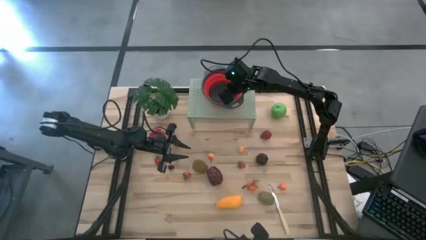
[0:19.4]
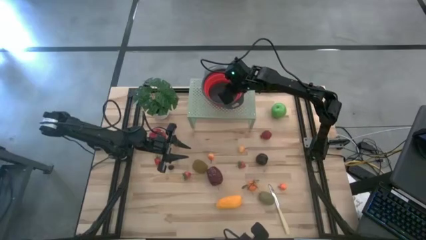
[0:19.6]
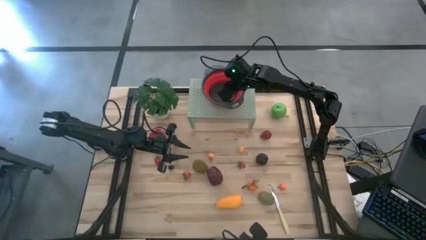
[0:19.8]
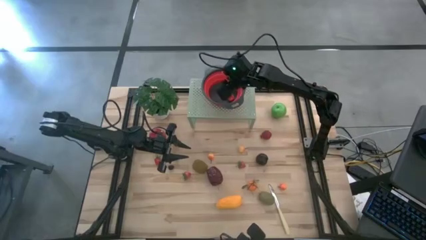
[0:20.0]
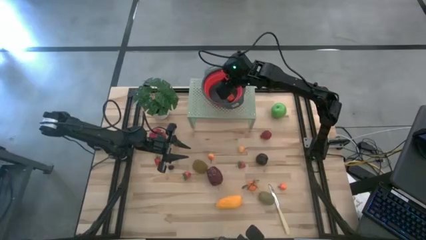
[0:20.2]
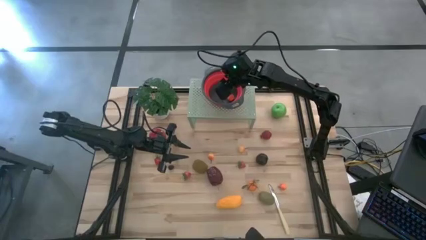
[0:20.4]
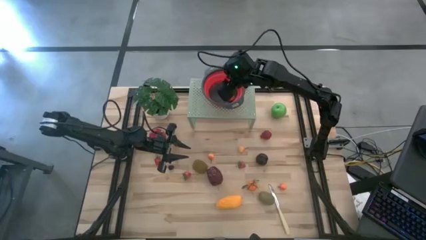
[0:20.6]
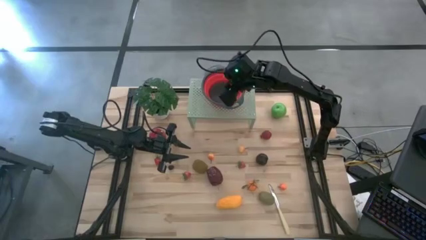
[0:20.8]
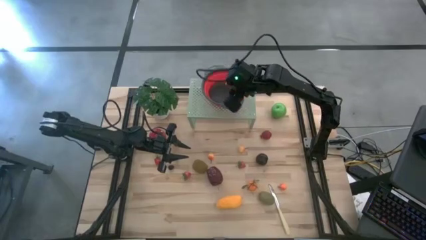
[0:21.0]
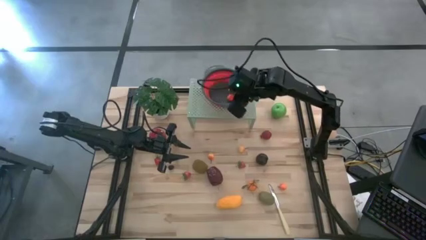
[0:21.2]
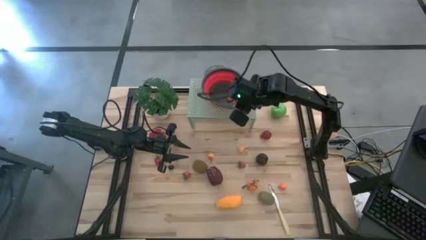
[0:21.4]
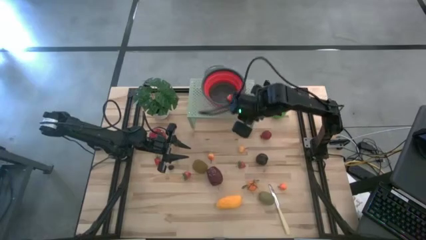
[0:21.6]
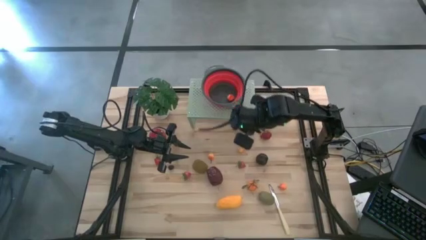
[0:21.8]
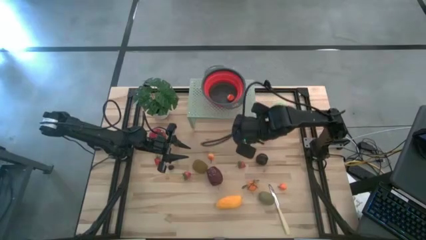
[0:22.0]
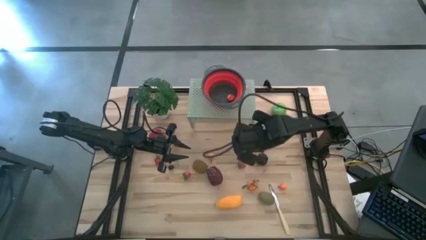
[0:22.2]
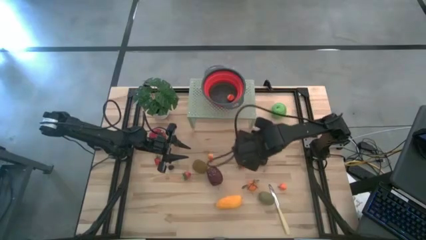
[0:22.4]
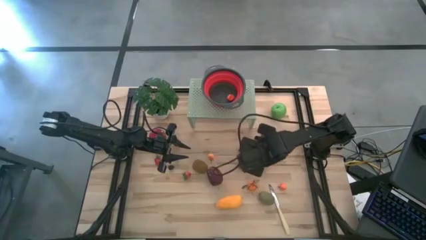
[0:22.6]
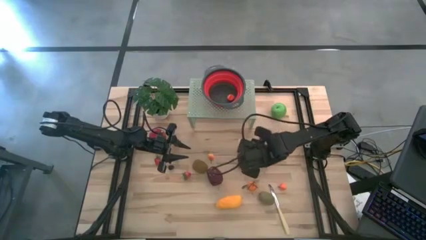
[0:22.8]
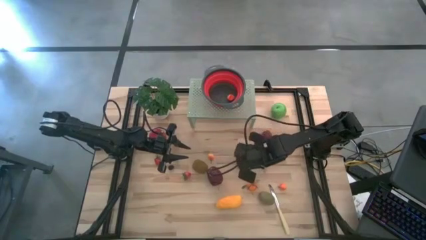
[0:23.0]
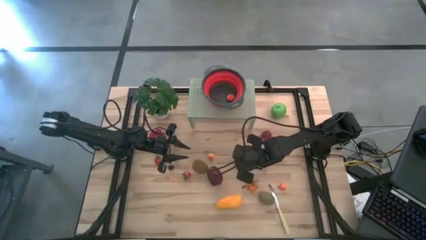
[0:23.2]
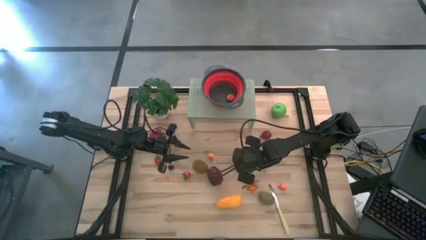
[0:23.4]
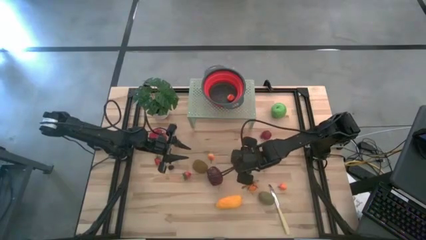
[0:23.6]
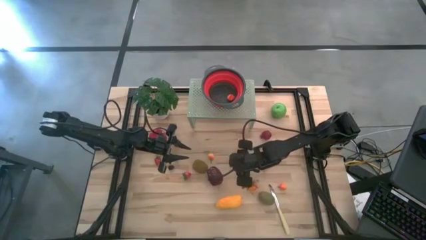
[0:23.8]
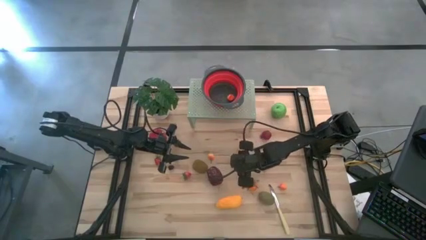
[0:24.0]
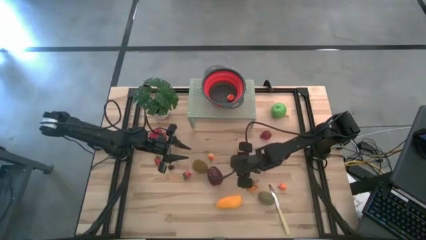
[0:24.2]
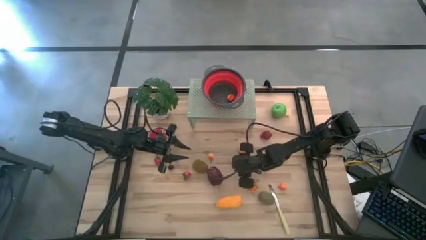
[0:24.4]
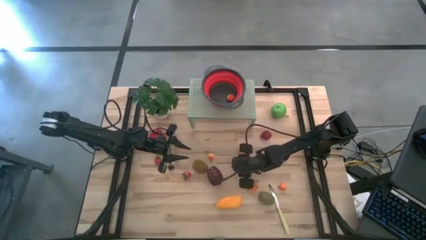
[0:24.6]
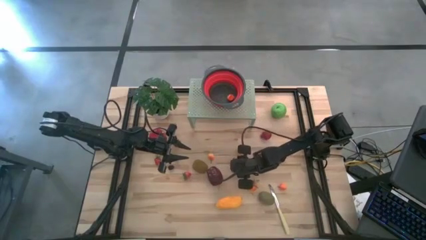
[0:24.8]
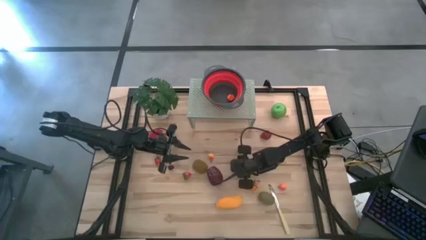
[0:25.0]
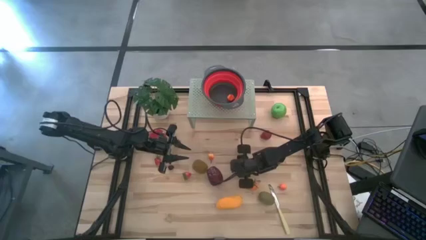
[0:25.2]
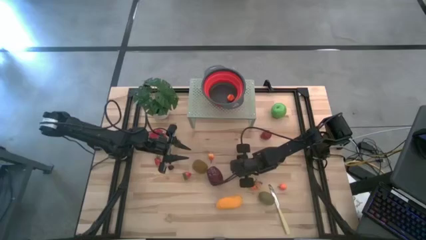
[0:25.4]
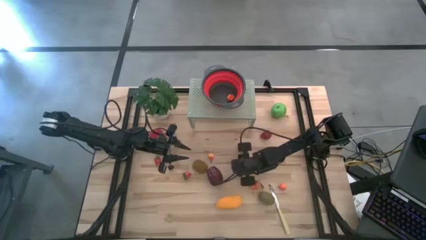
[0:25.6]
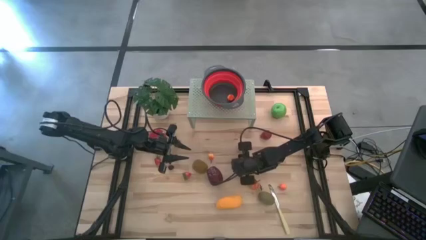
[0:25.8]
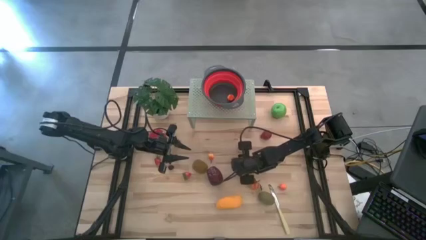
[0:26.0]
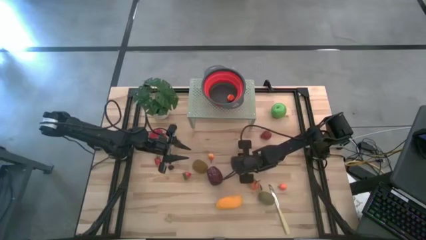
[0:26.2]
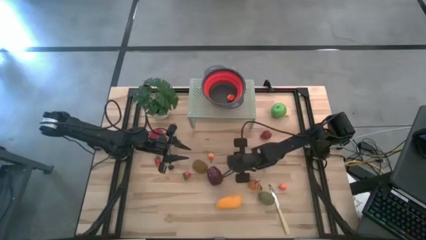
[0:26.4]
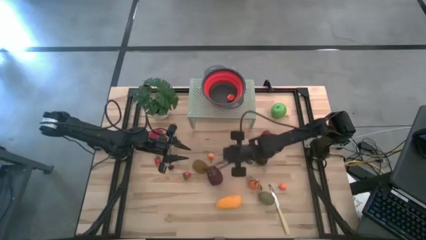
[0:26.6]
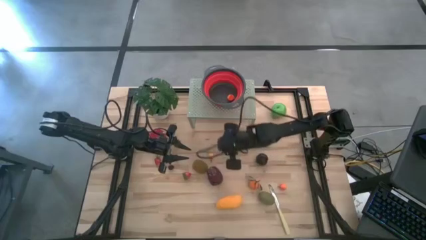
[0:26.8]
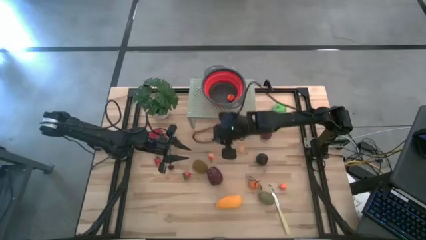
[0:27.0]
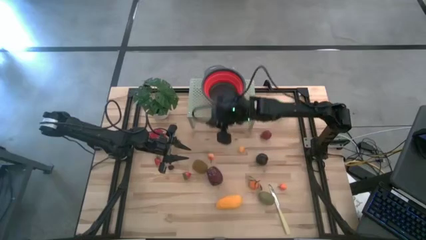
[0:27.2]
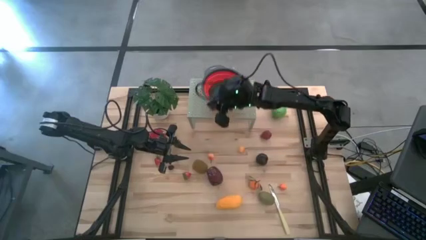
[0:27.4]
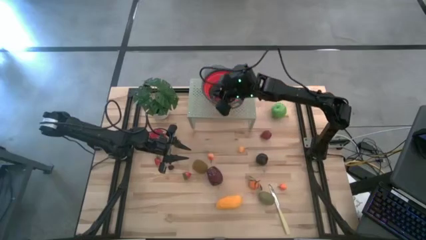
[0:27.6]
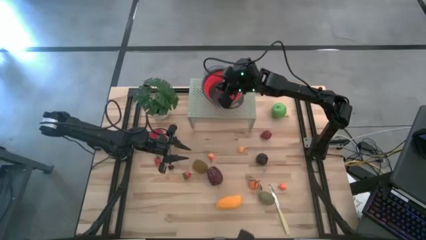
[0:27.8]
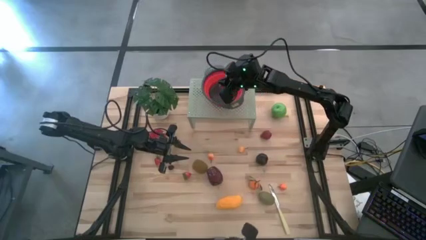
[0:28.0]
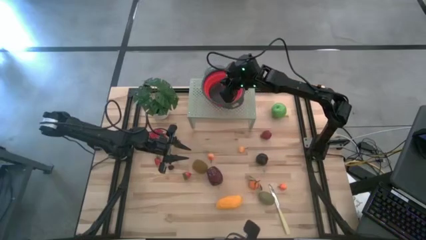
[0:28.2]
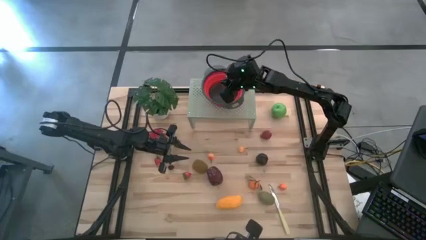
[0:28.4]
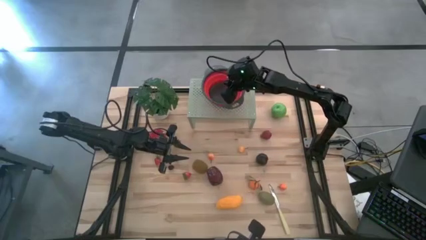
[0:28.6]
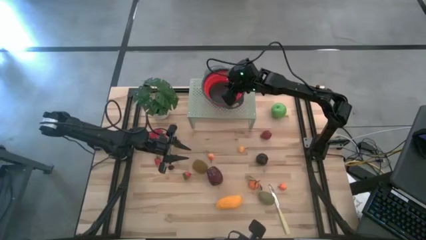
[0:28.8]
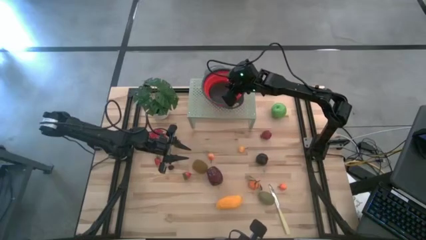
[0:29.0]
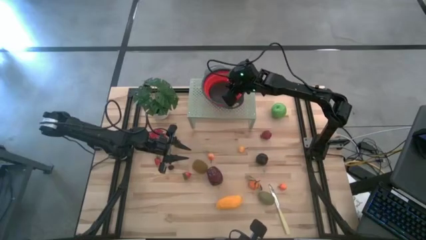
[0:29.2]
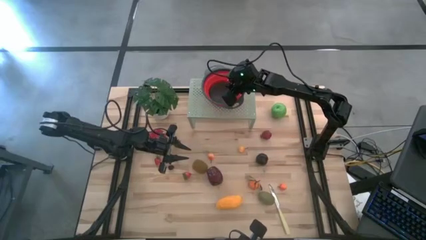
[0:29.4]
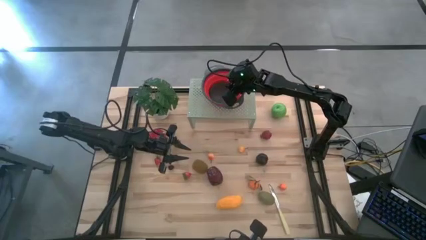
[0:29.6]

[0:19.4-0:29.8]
Task: Pick & Place Fruit
Put the strawberry into the red strainer bowl on the shelf

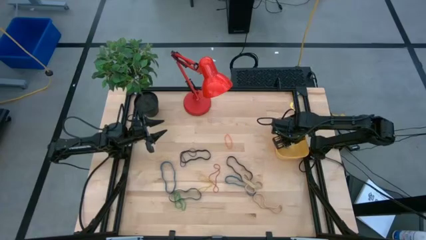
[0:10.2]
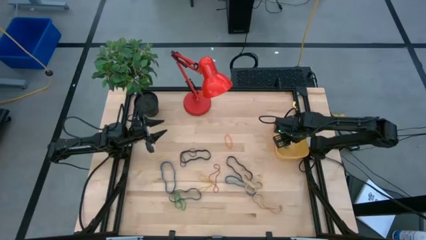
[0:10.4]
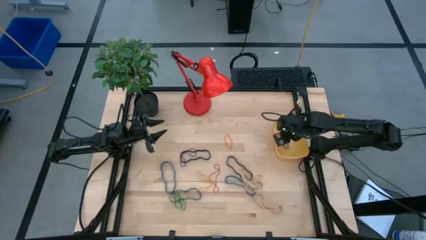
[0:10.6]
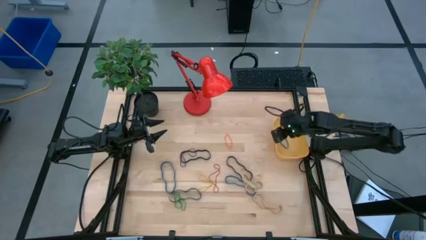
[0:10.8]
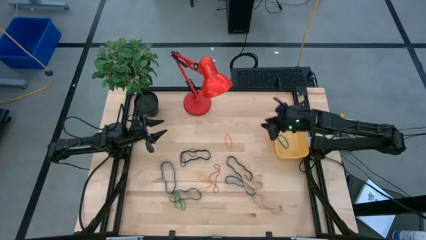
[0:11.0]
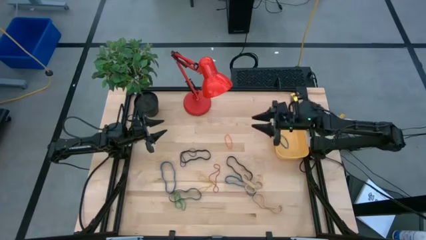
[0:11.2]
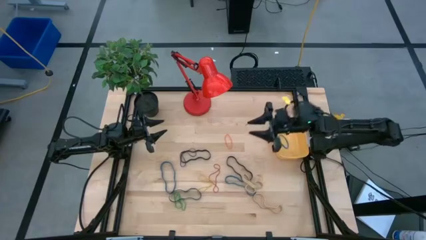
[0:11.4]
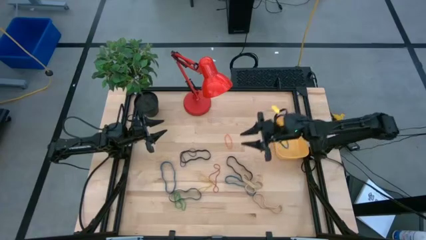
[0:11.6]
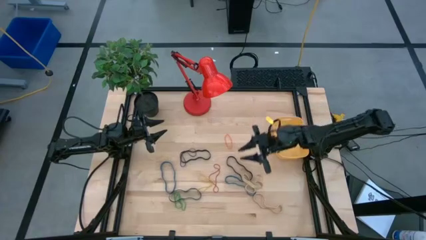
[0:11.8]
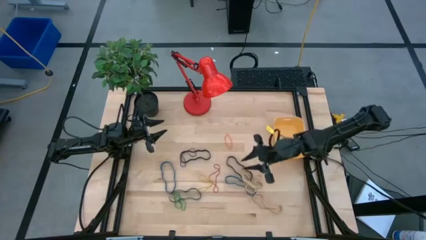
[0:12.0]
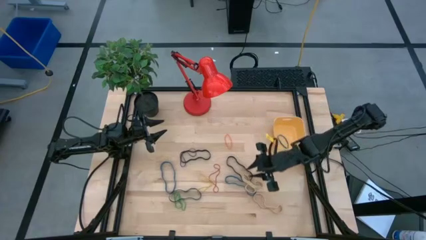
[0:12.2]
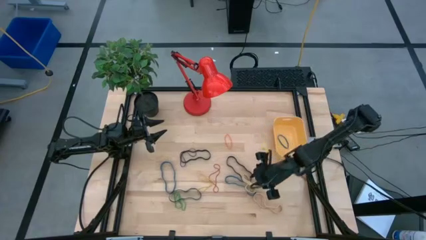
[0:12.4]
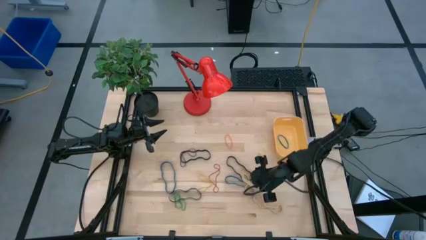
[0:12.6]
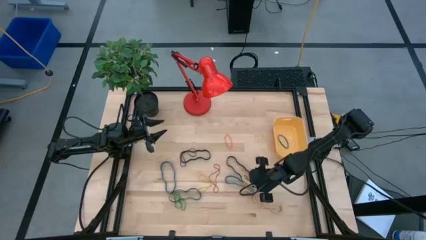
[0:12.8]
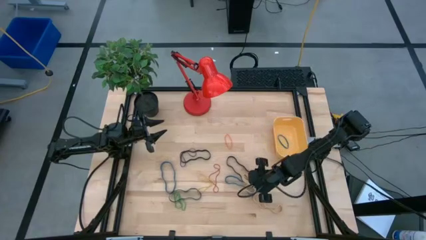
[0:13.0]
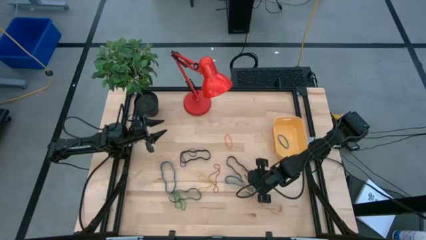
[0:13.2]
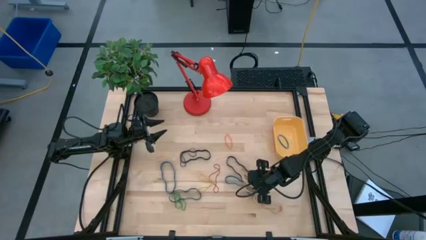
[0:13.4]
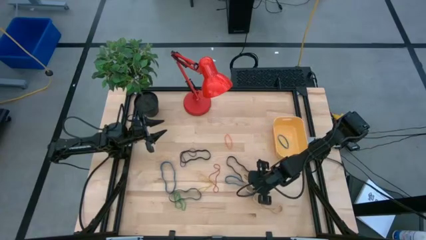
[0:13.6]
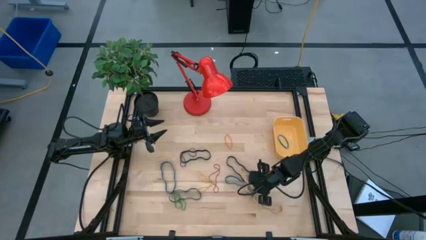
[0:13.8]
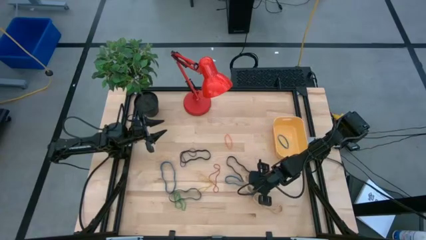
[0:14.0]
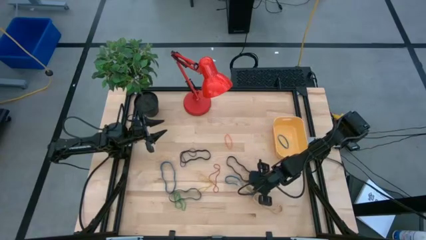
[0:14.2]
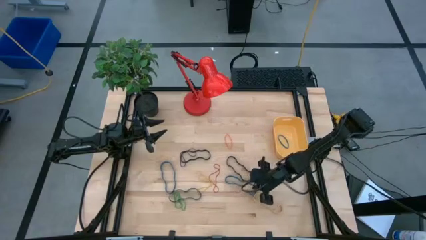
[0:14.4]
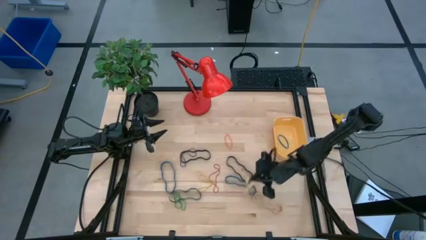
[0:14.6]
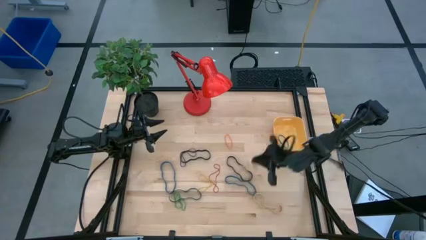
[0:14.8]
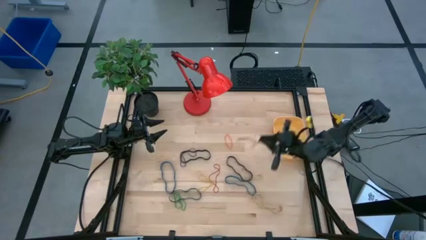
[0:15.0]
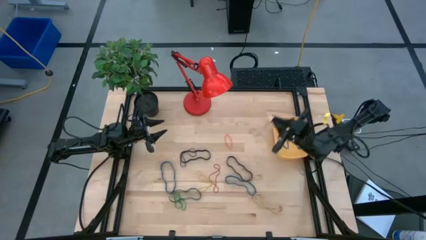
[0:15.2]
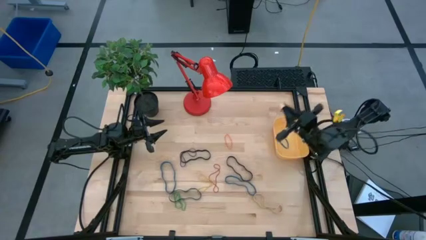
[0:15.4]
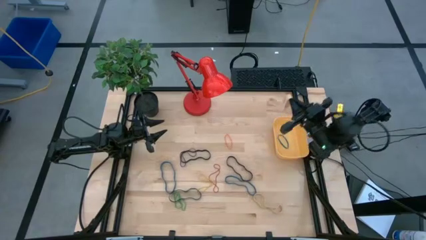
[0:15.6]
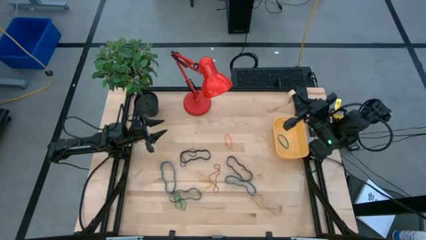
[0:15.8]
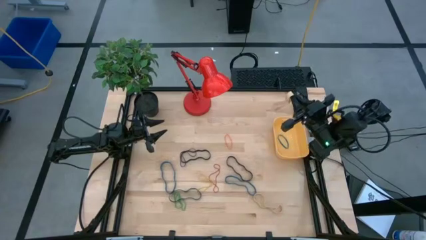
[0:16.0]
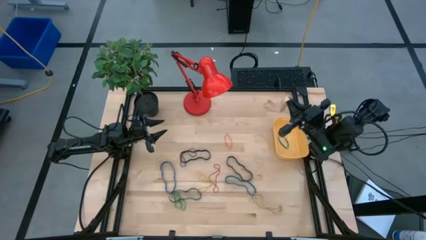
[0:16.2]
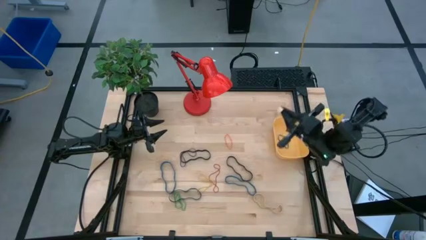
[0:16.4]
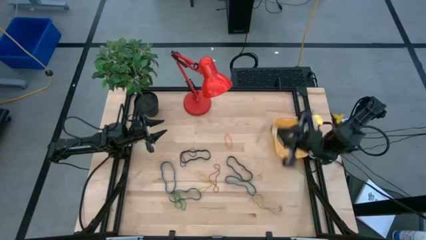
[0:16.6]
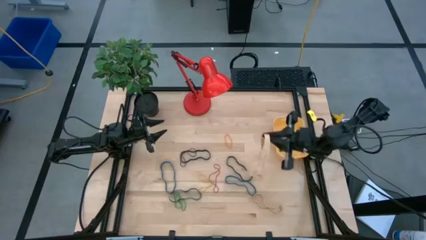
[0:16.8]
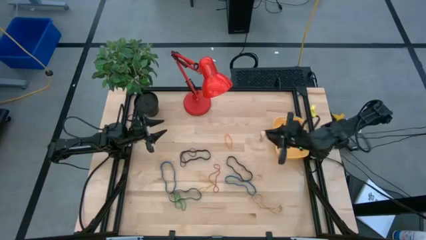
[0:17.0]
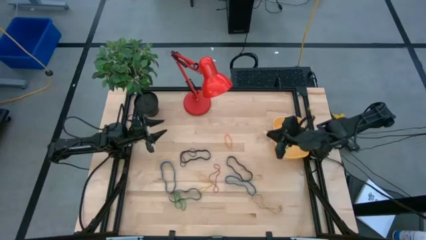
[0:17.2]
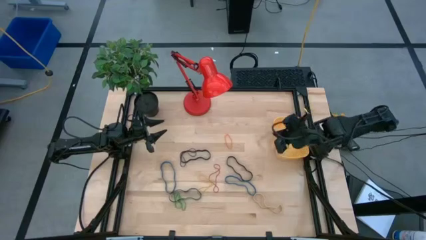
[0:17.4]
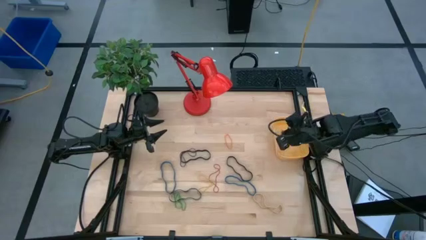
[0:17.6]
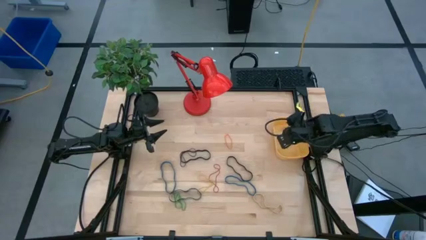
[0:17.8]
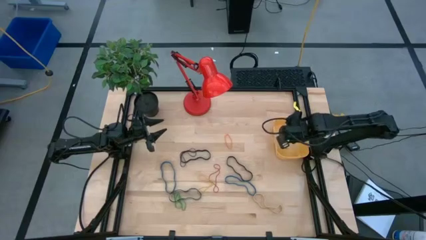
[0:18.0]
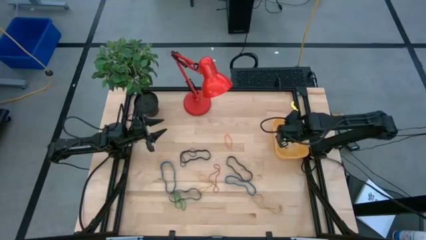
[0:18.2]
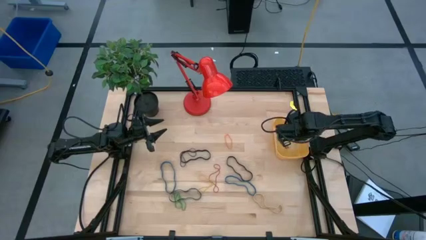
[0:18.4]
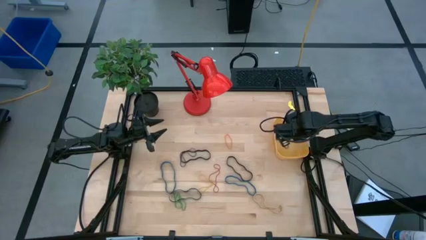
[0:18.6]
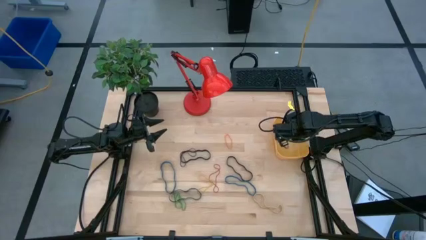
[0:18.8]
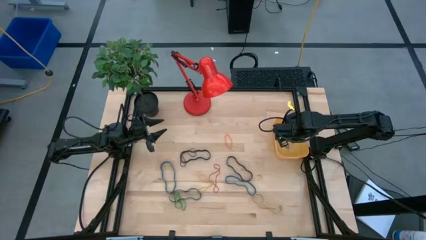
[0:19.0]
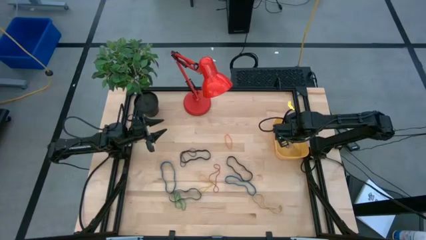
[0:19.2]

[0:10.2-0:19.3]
Task: Pick and place rubber bands into bin
Put the top white rubber band into the yellow bin
